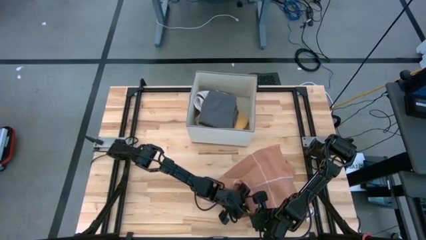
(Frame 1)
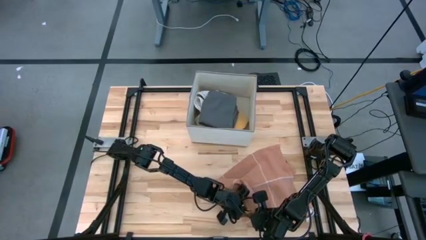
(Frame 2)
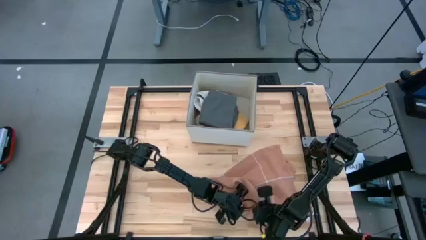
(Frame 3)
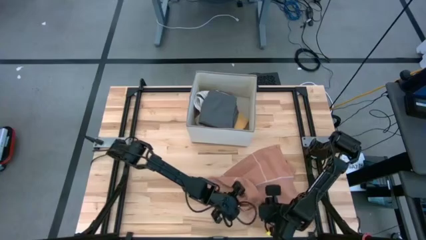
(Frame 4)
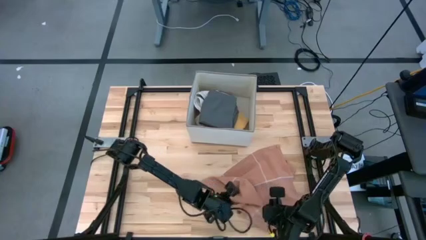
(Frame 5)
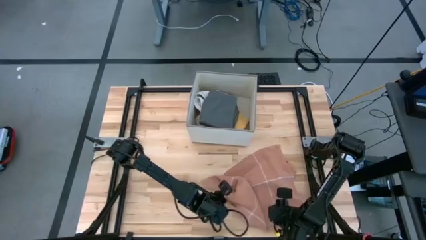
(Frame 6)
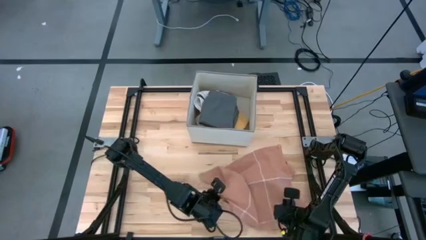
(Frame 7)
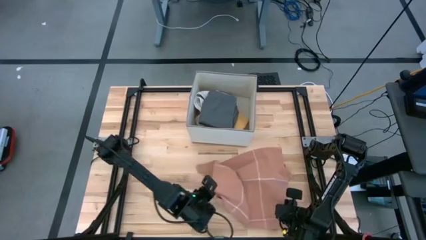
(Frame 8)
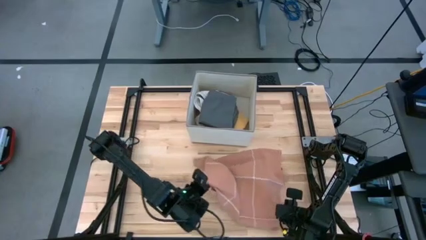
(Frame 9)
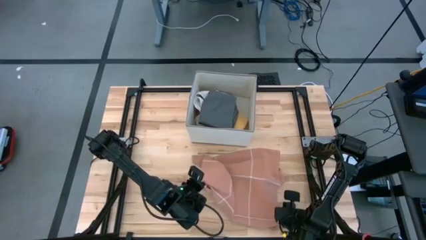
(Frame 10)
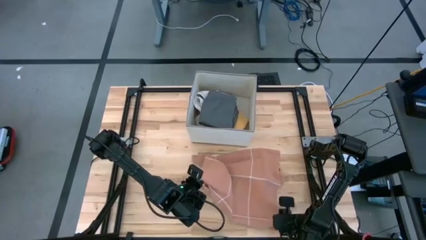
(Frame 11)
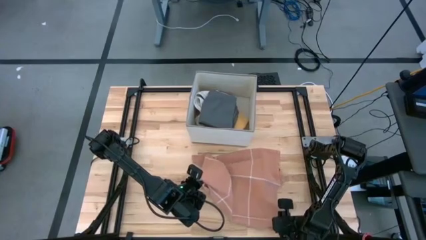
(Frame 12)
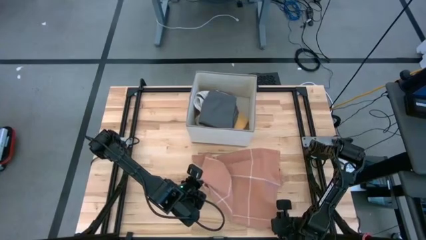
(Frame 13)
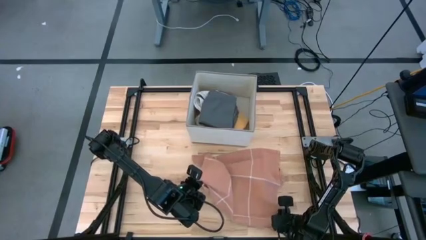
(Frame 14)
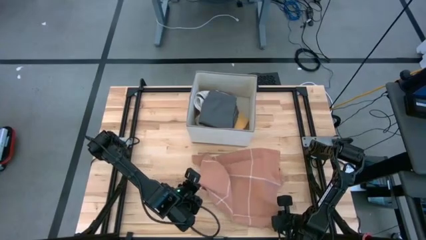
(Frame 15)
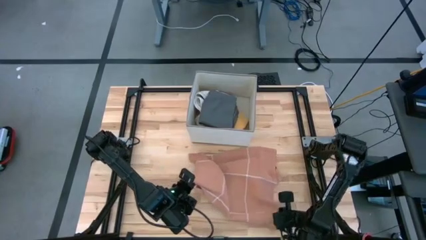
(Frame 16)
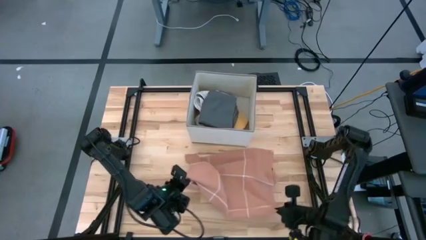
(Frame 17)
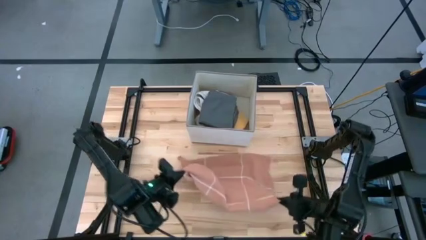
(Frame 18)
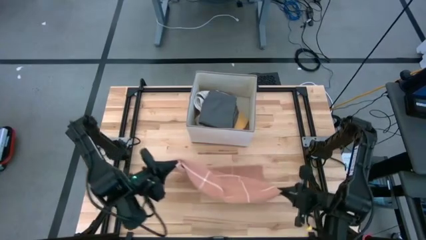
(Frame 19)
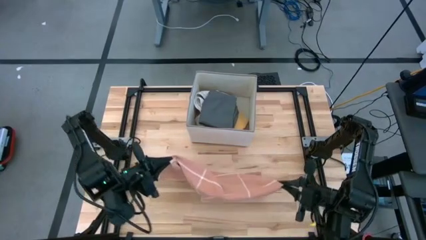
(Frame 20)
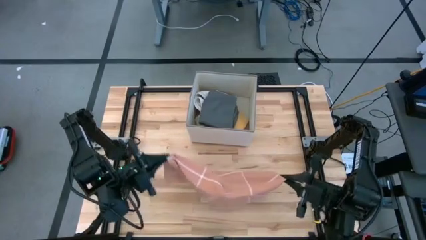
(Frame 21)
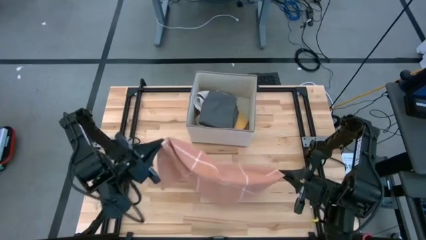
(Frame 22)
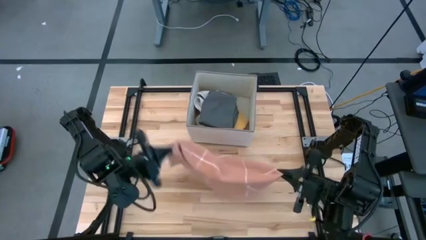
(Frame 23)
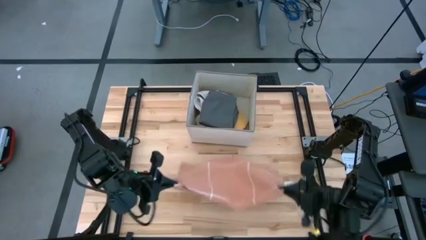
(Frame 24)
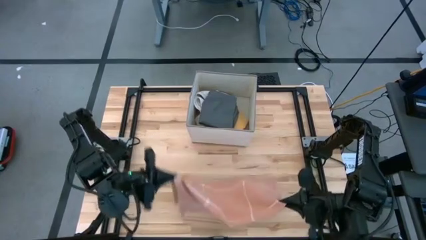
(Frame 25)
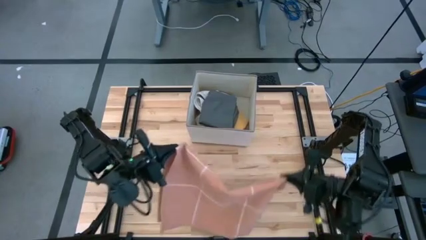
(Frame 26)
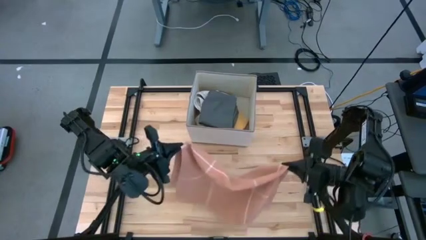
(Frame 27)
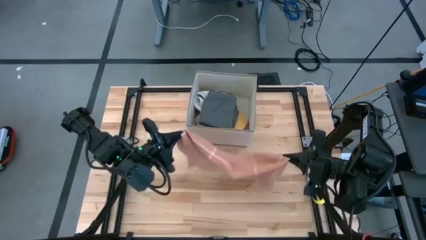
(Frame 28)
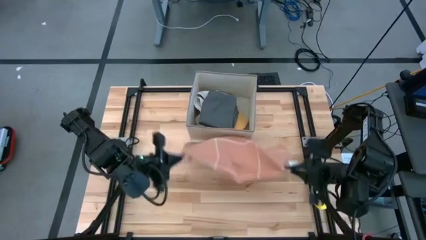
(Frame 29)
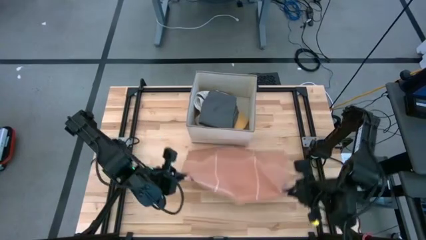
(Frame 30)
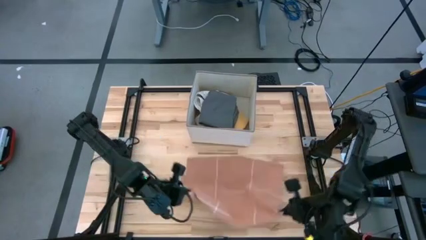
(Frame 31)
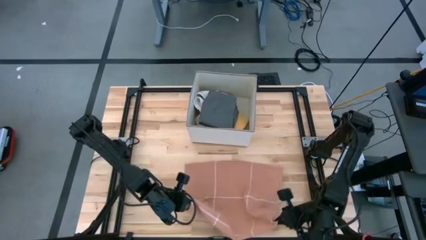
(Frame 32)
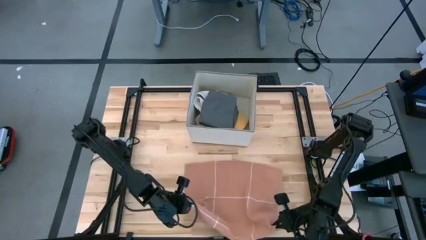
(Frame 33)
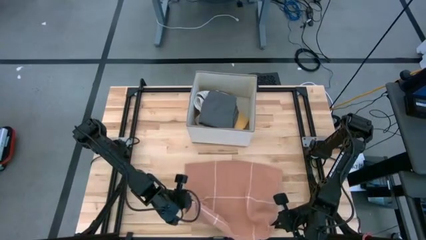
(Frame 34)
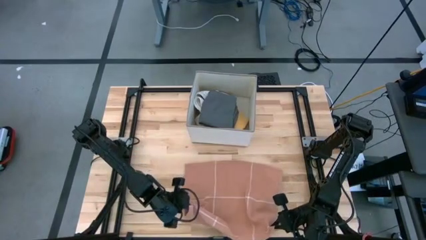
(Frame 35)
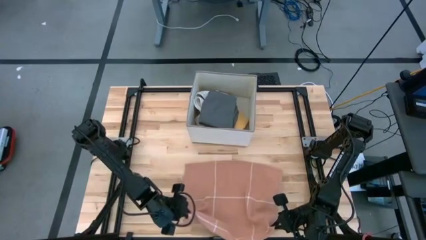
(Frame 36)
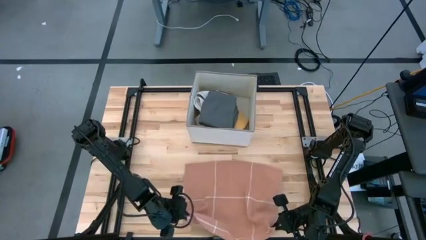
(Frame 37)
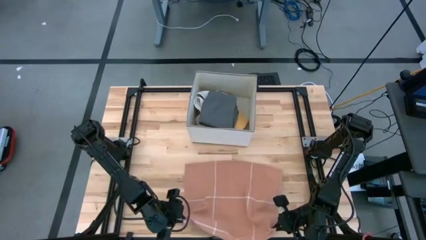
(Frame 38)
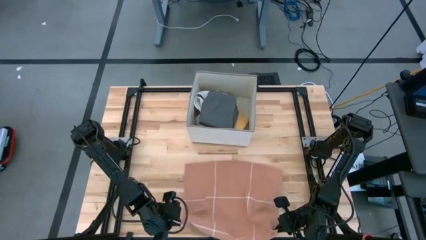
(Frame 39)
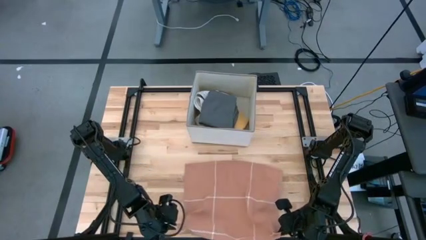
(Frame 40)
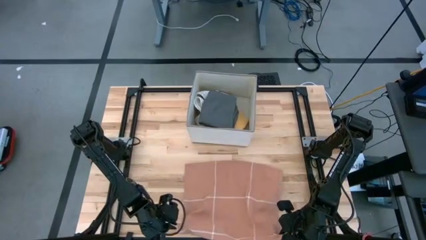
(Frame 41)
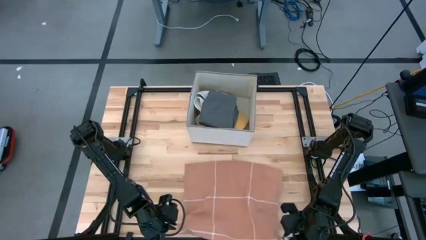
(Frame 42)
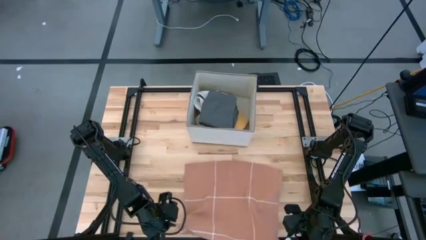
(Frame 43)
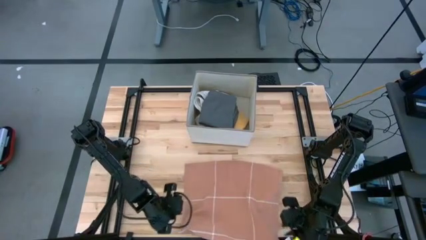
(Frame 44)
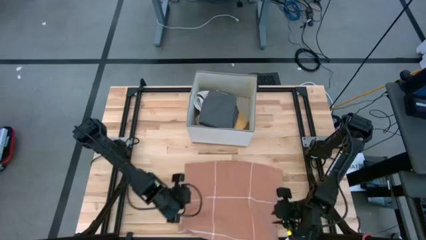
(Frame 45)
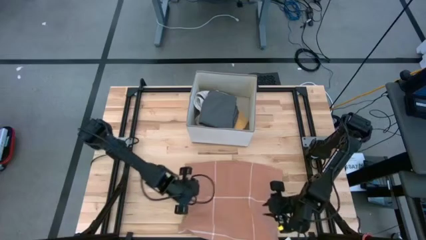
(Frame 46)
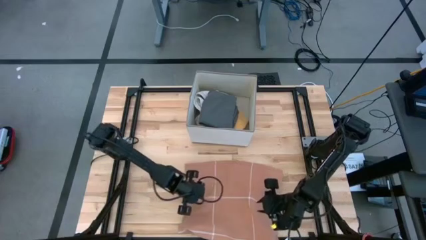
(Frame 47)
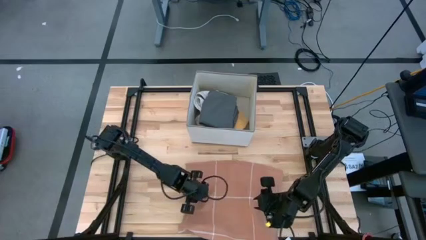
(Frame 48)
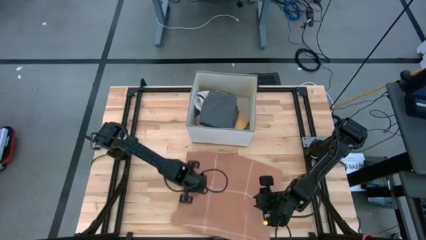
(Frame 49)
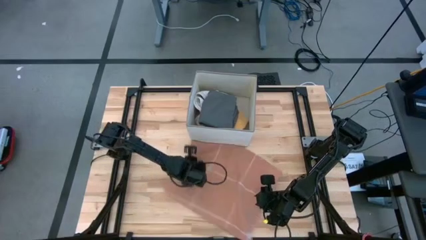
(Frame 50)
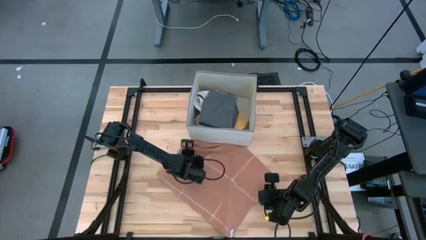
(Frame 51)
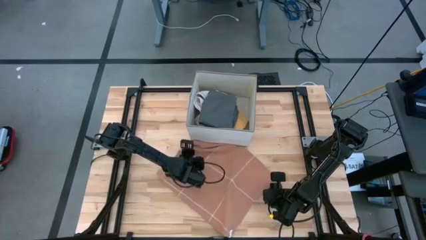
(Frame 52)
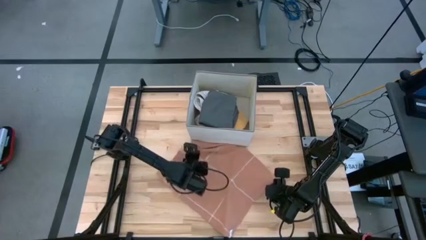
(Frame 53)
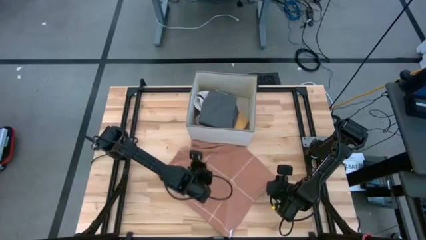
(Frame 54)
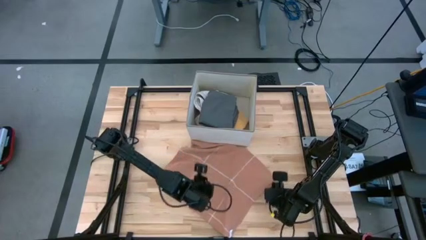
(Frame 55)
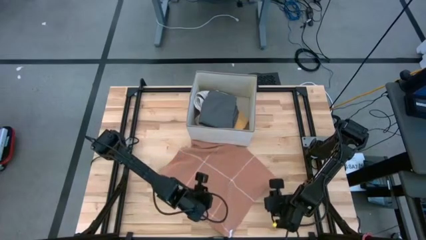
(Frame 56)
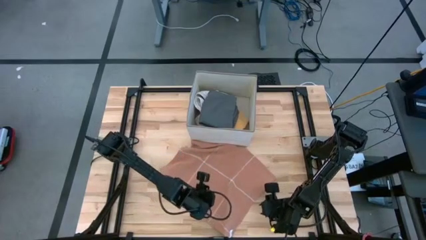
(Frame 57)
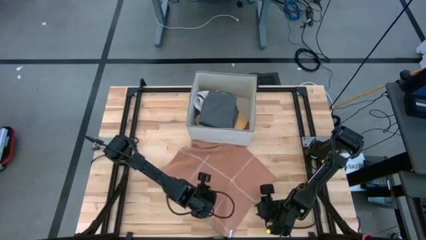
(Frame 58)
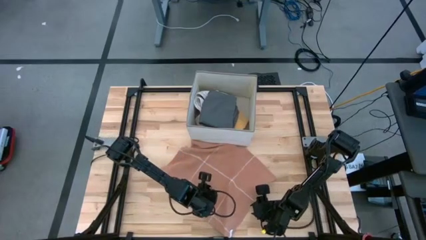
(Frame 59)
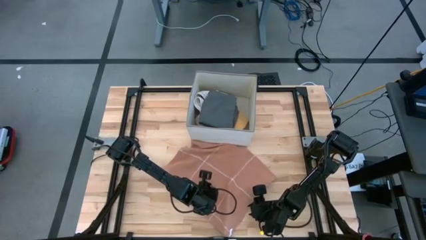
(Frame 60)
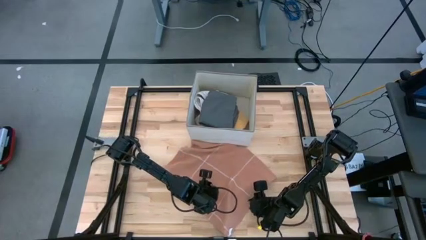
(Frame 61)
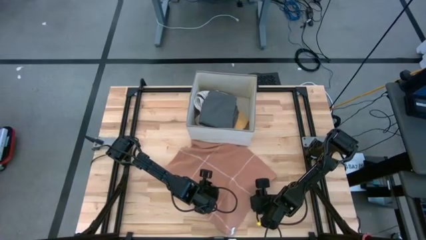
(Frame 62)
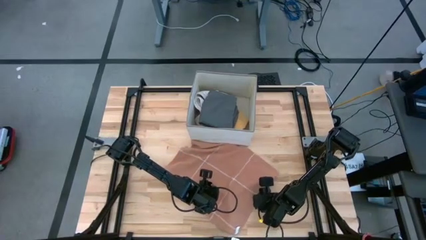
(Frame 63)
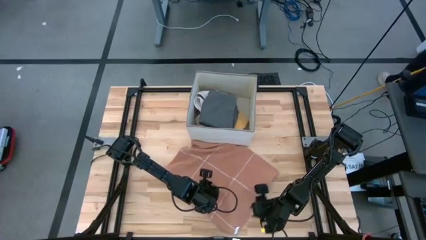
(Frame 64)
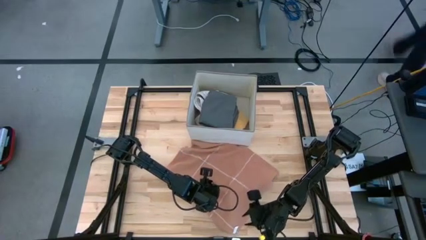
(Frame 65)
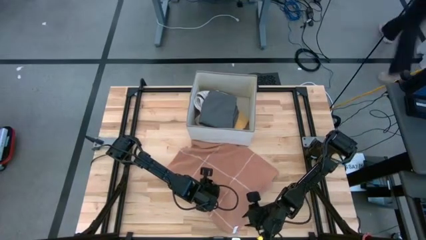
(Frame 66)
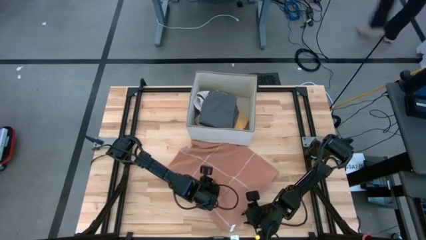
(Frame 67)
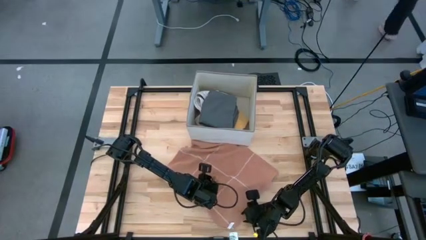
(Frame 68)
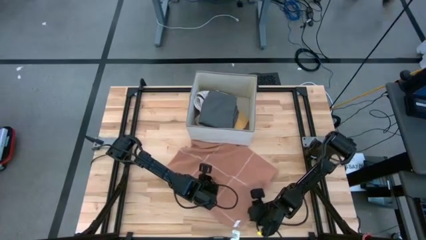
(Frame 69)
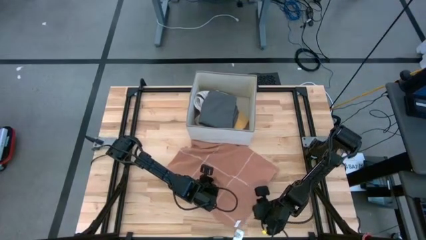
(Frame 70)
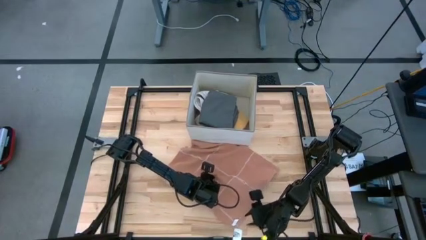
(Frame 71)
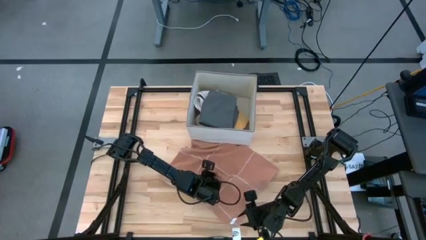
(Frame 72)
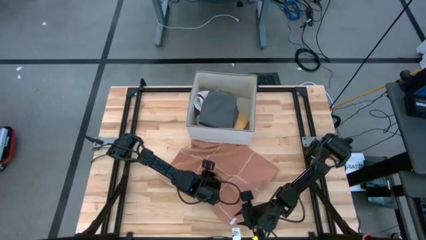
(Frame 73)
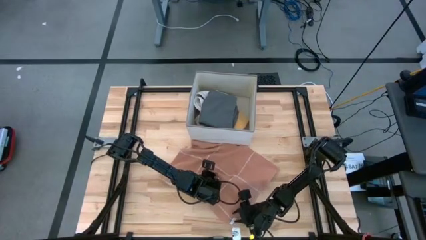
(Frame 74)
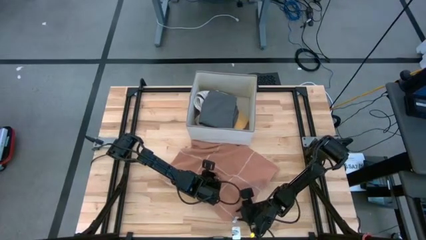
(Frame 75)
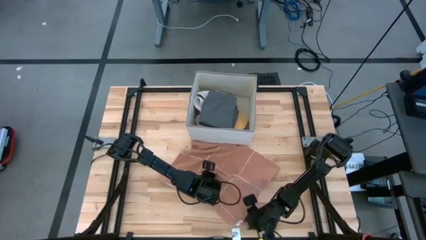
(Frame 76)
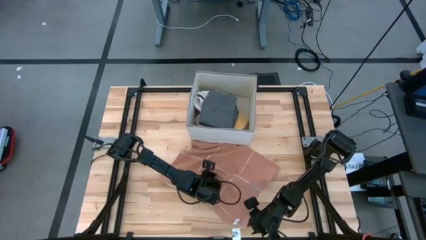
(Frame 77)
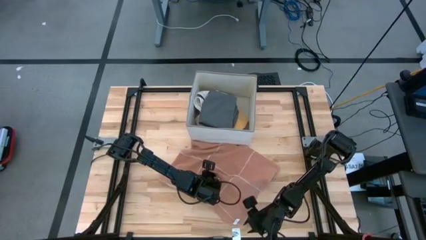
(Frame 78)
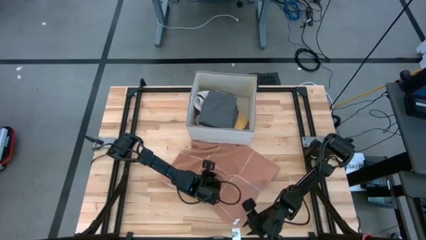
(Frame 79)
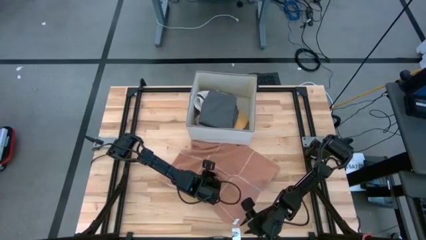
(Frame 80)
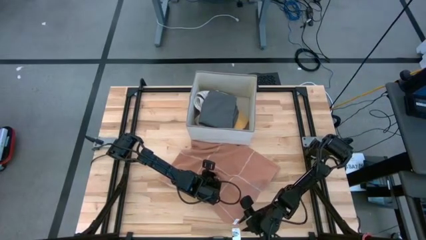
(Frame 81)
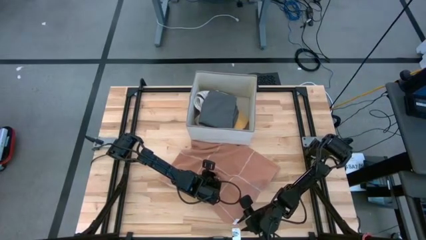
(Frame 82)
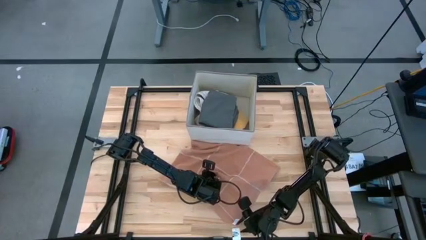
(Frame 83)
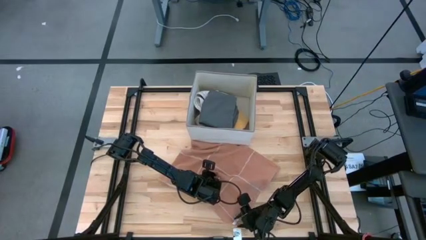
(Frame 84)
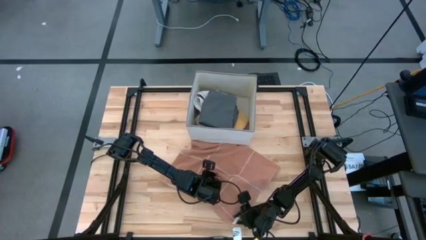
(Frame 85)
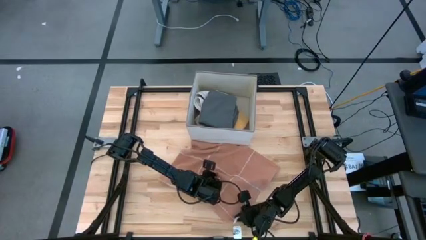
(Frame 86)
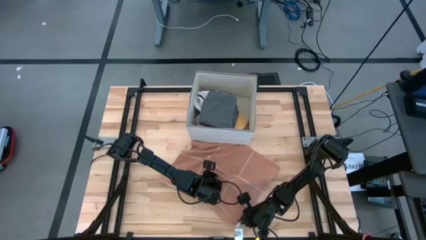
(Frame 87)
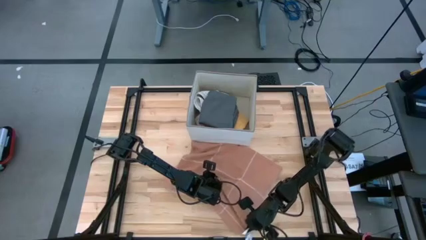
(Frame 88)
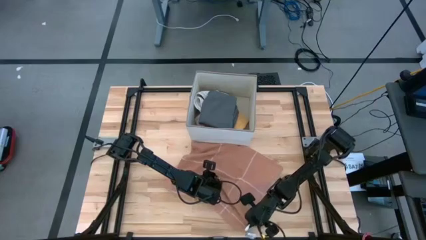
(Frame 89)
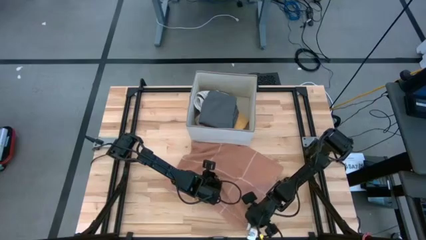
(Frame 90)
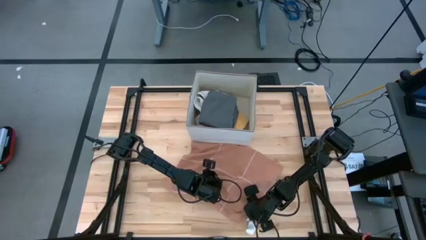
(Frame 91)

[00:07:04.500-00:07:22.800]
Task: Fold towel
Fold the brown towel with white checkered lines
